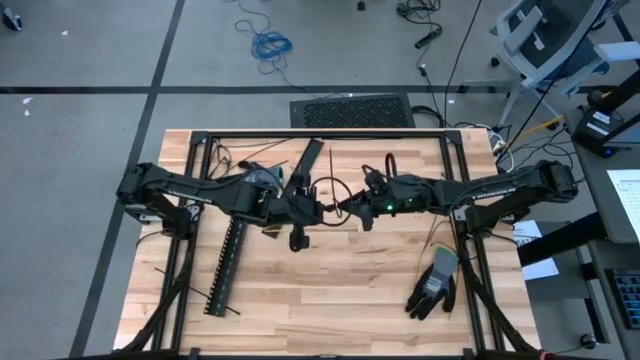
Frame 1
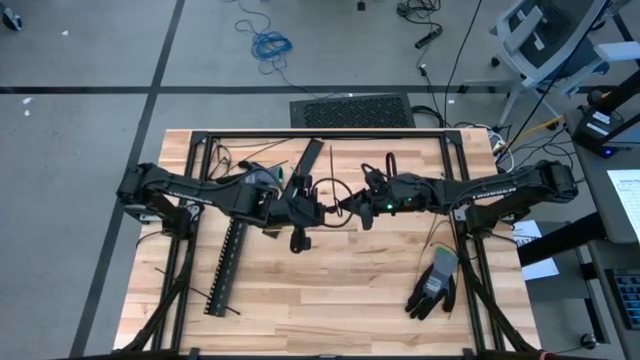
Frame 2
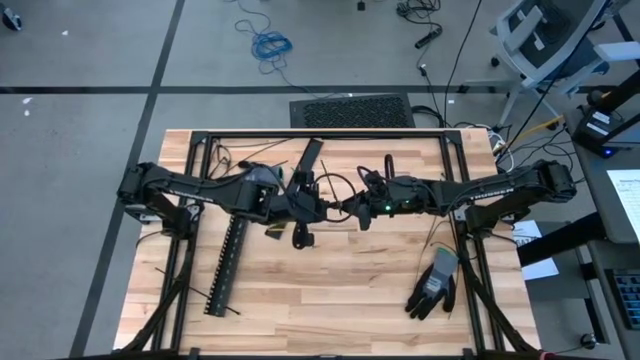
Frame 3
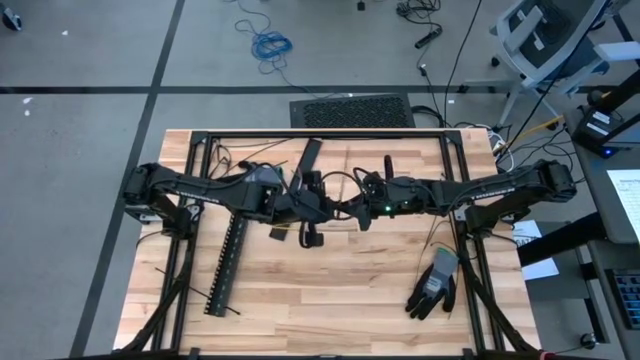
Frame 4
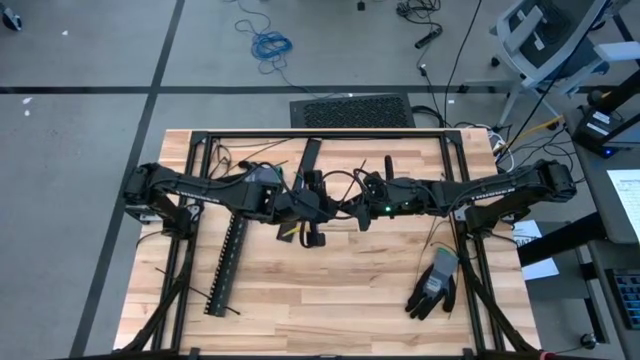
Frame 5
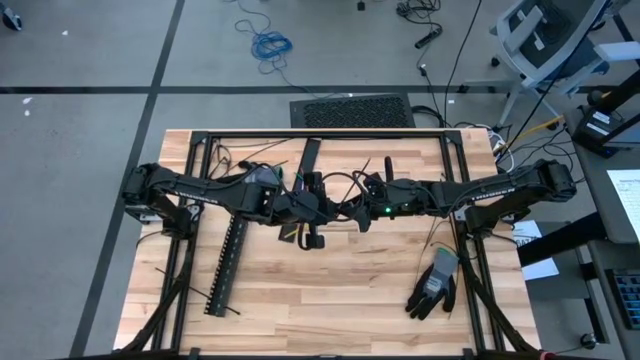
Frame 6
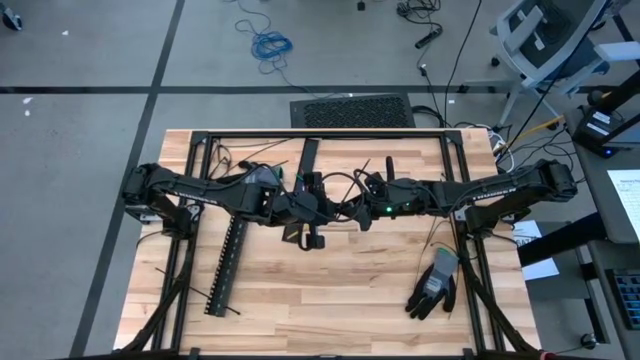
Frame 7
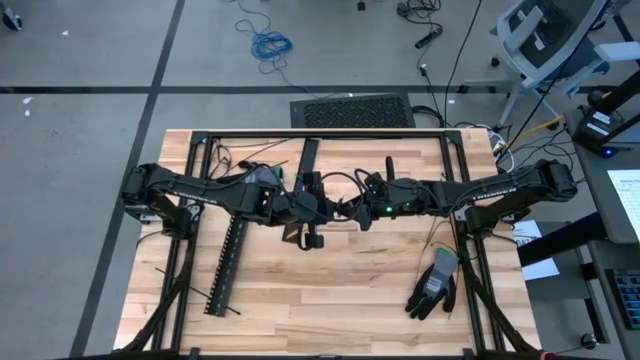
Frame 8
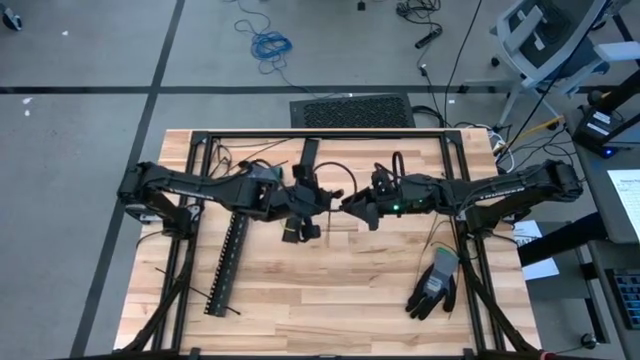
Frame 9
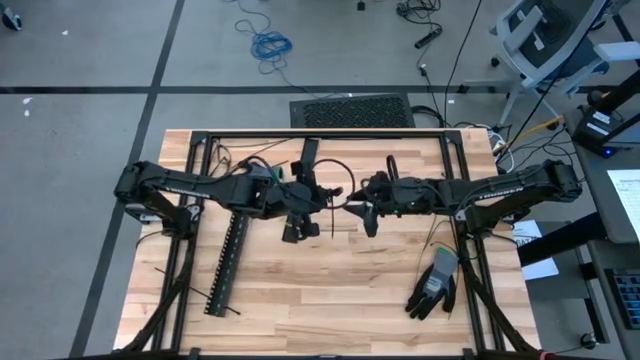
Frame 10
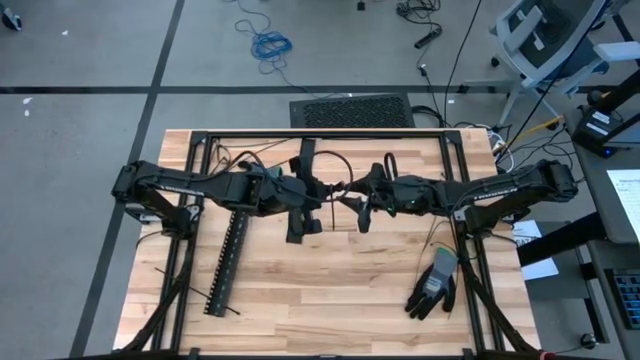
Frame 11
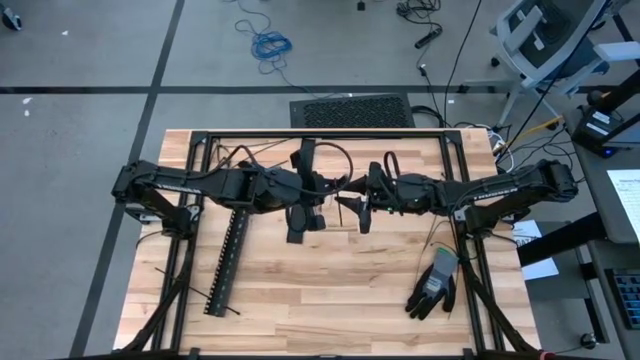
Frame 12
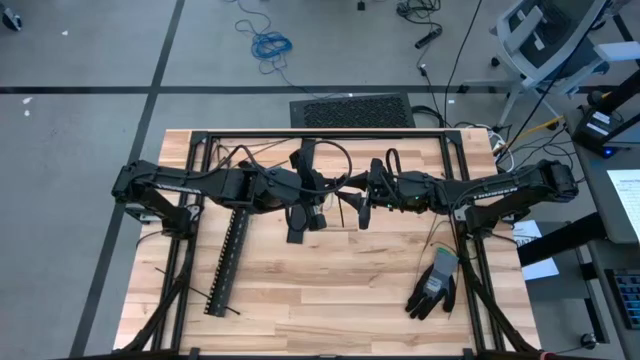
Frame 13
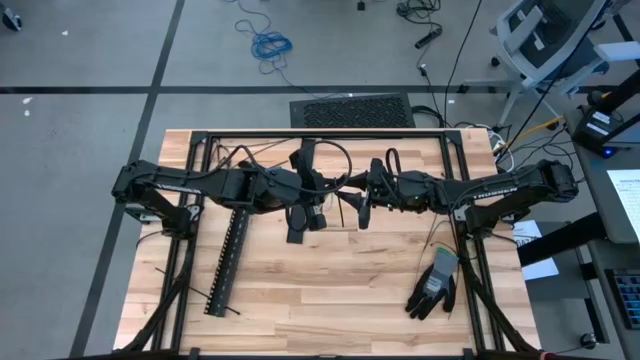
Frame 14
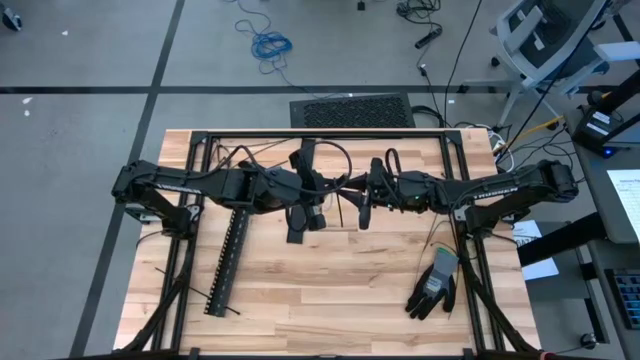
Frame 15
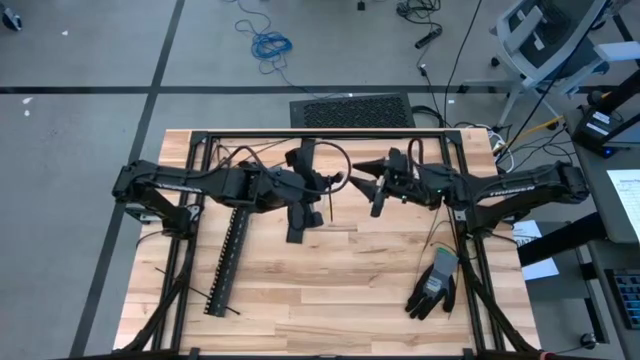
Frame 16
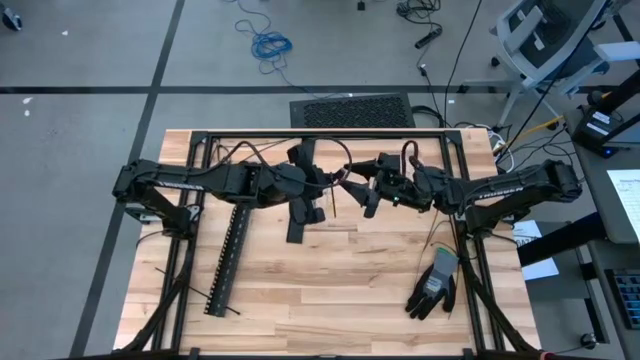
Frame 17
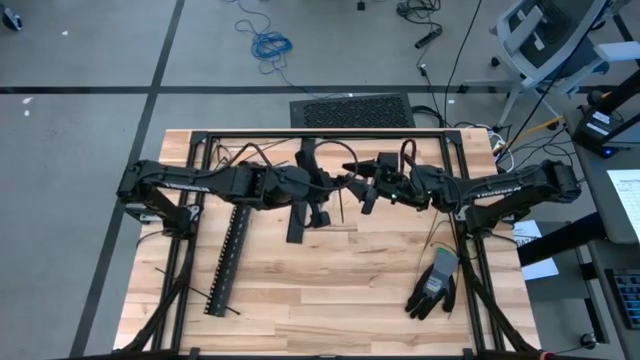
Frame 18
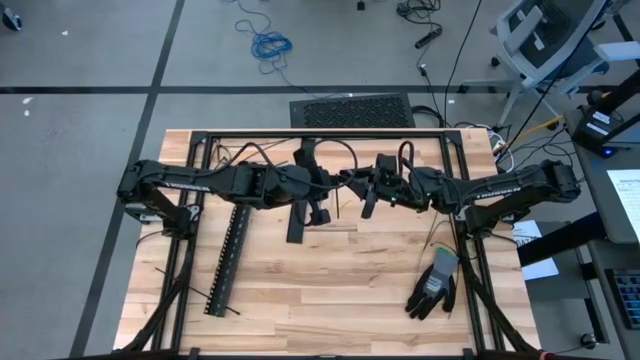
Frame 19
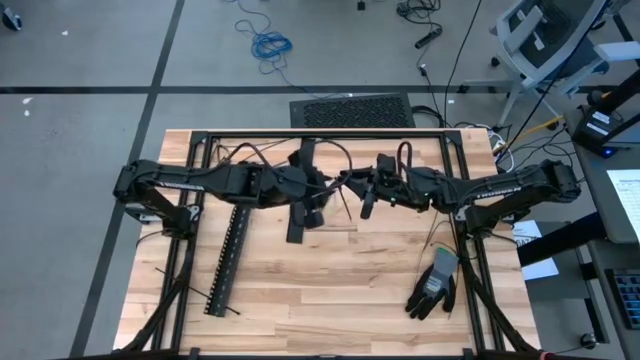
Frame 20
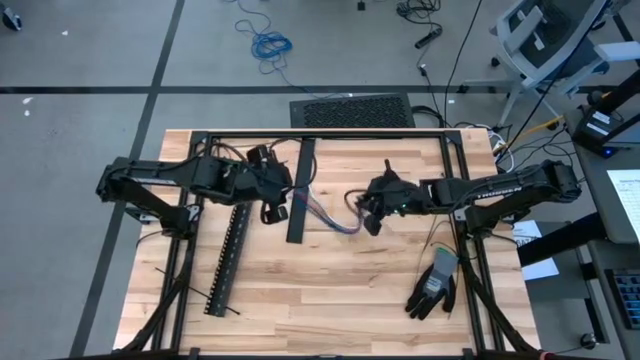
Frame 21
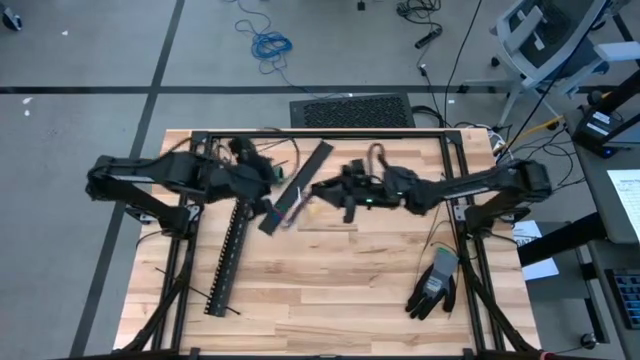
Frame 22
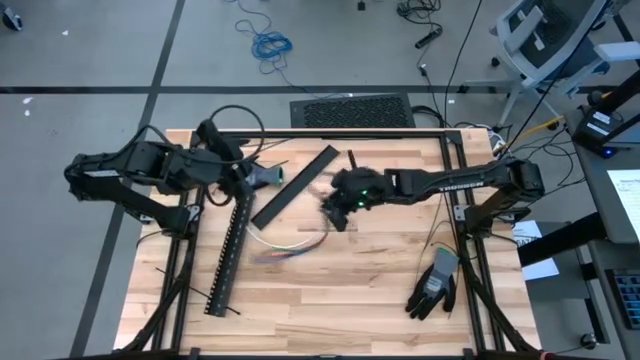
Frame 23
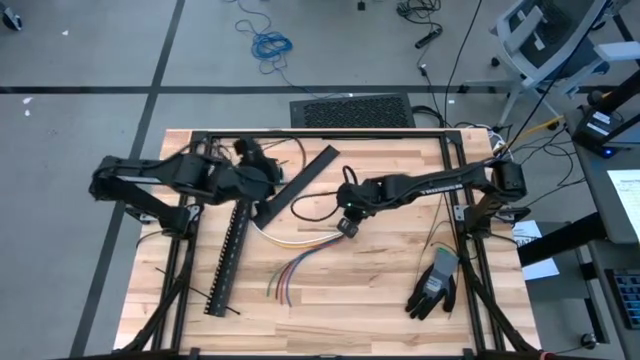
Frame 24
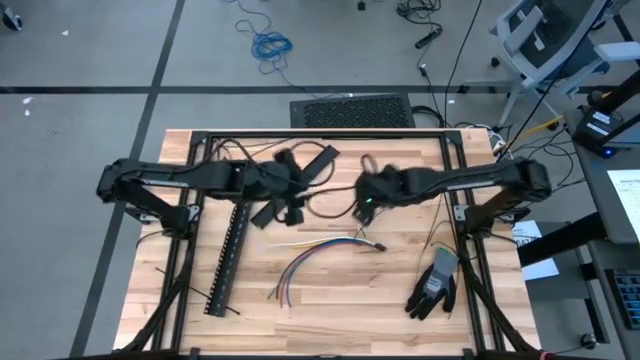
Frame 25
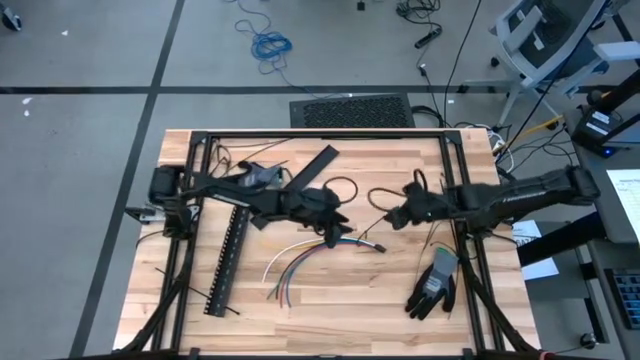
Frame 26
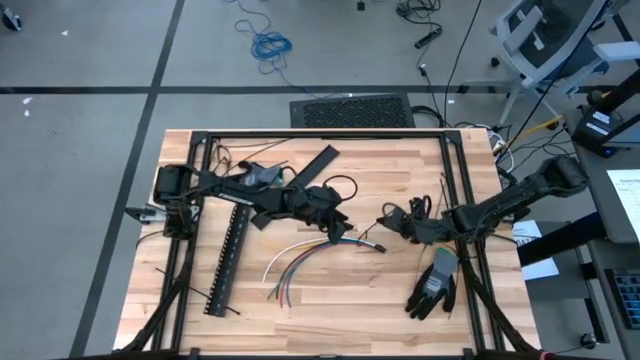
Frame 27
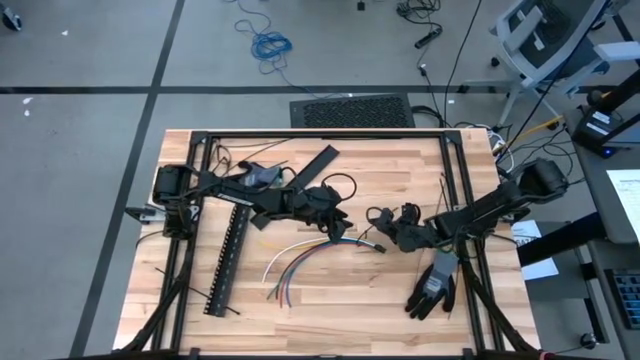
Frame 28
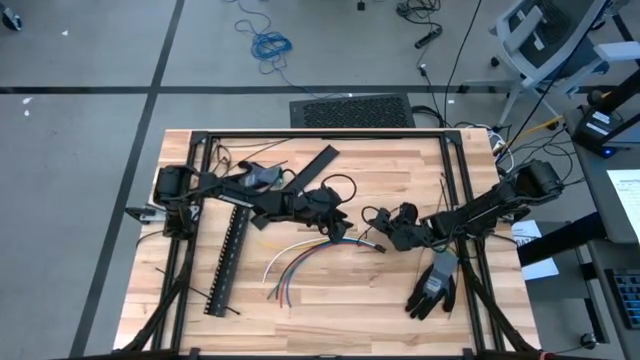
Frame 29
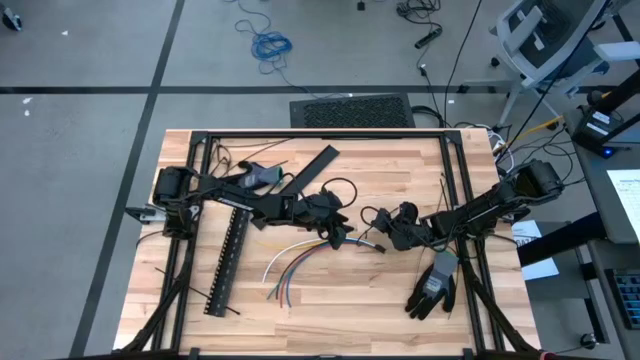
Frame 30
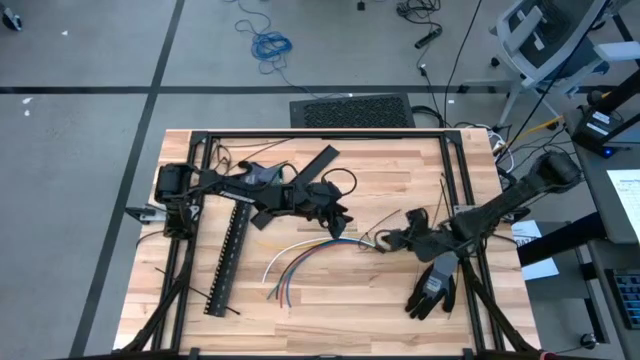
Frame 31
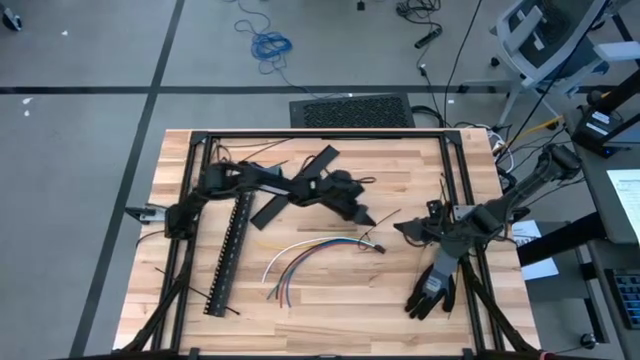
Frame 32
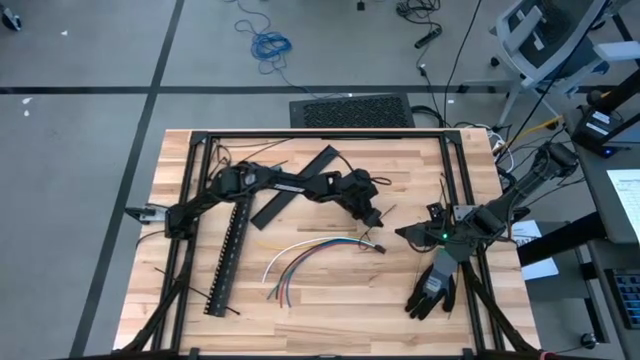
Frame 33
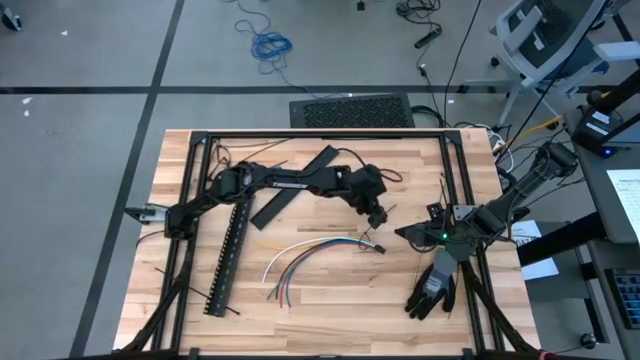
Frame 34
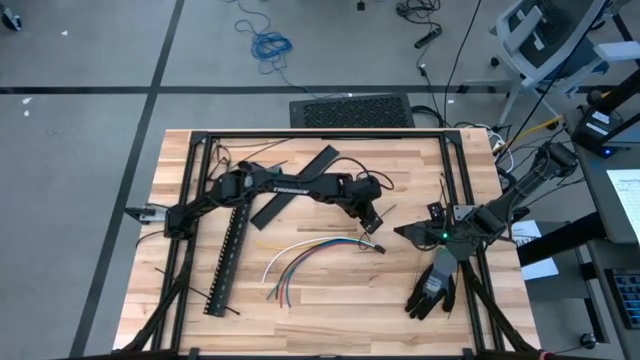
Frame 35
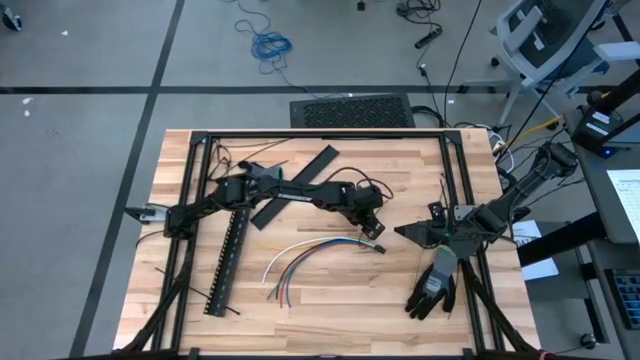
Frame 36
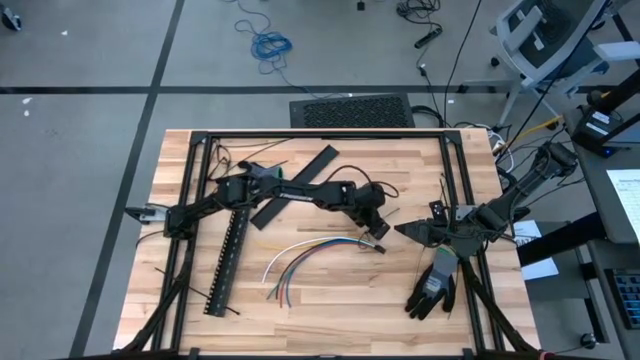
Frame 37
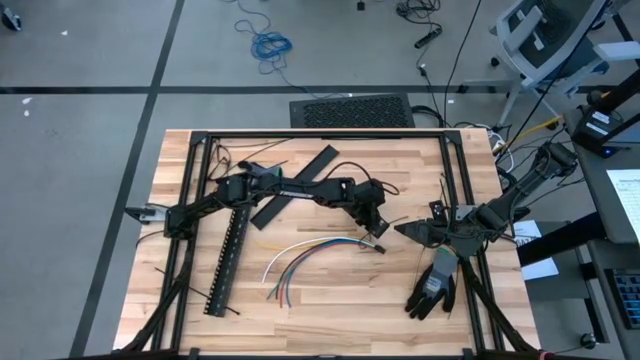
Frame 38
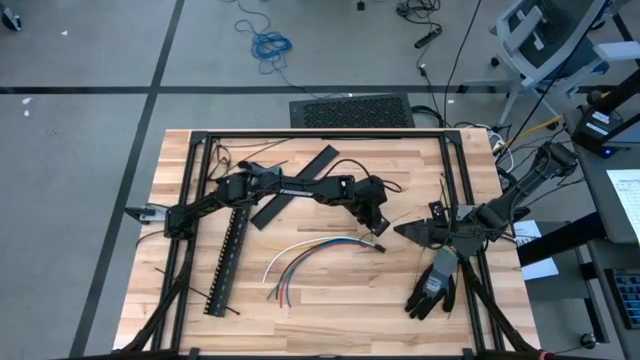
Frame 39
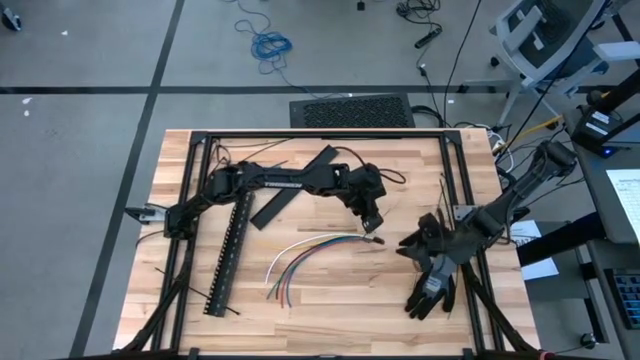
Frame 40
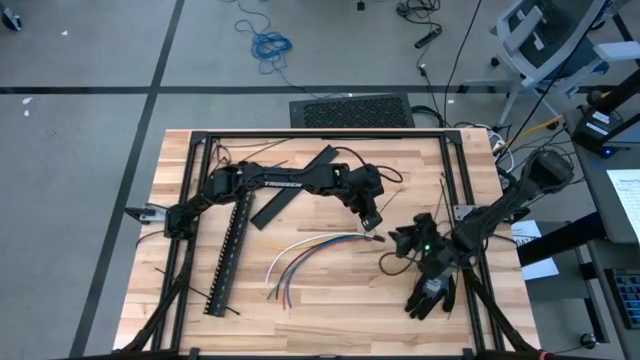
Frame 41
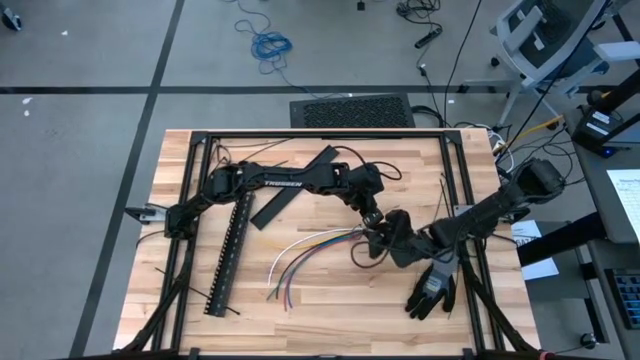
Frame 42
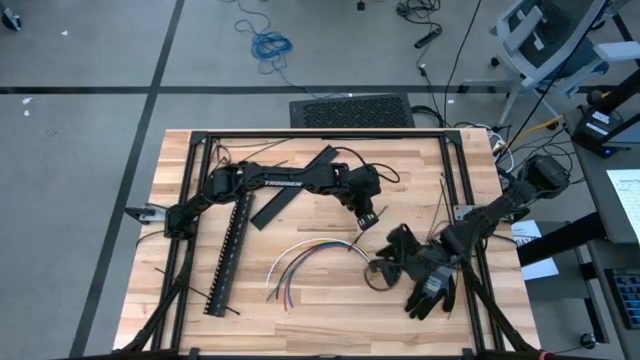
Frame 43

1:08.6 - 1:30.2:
Task: Ziptie cables
Wrap the cable wires with a black zip tie
